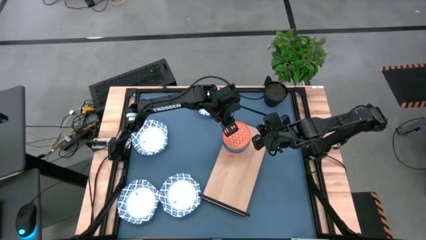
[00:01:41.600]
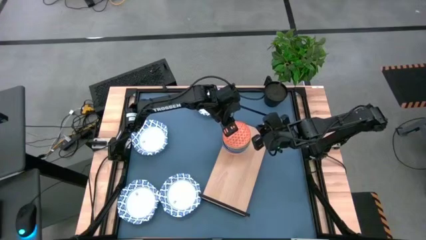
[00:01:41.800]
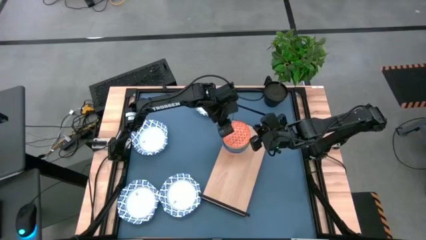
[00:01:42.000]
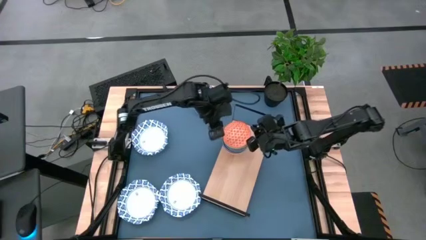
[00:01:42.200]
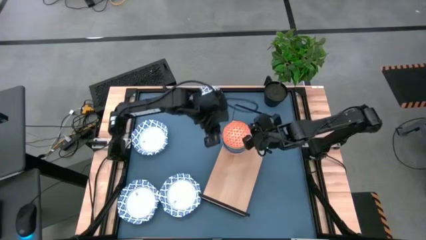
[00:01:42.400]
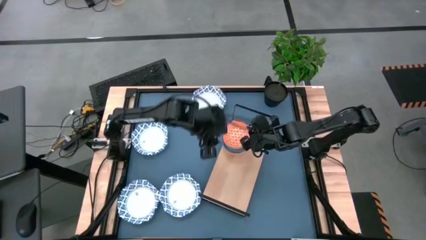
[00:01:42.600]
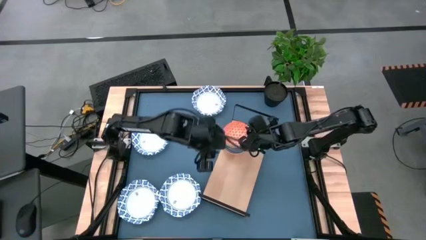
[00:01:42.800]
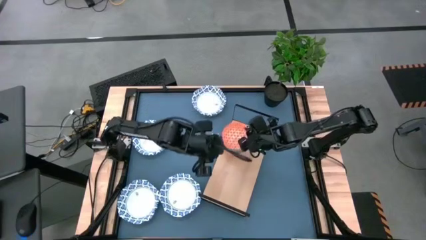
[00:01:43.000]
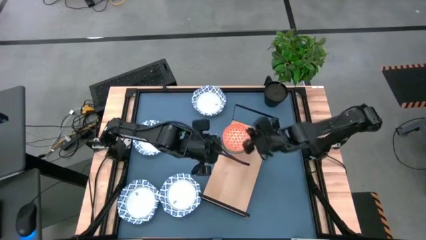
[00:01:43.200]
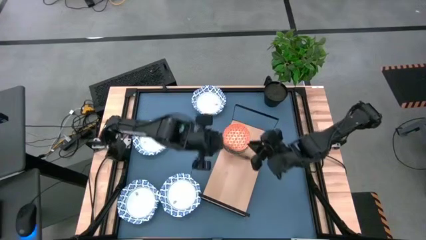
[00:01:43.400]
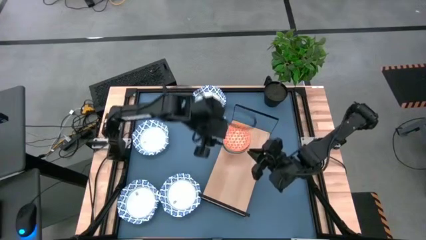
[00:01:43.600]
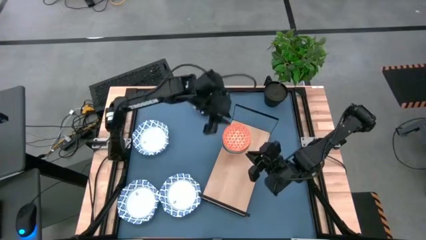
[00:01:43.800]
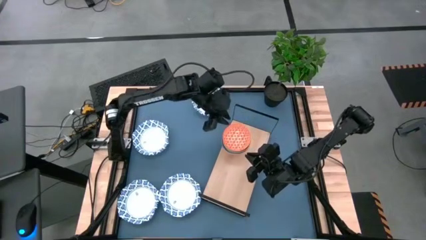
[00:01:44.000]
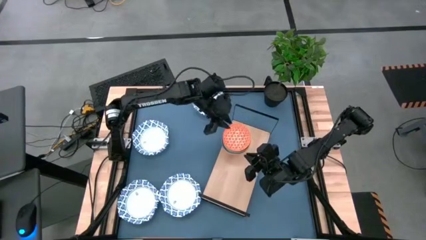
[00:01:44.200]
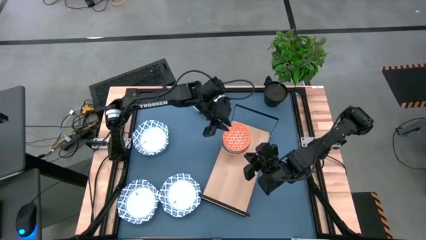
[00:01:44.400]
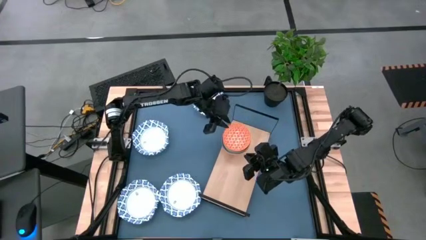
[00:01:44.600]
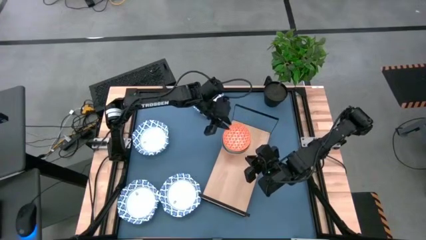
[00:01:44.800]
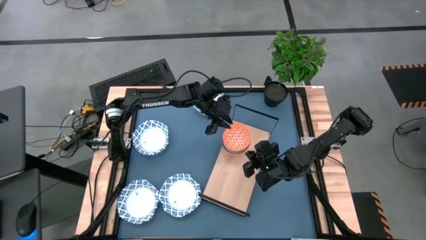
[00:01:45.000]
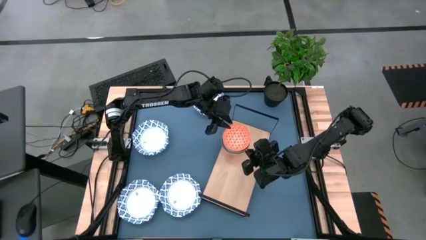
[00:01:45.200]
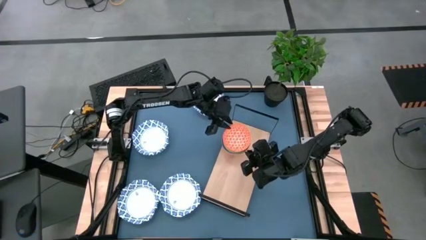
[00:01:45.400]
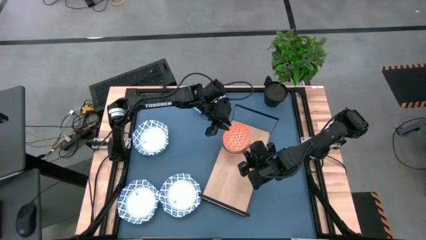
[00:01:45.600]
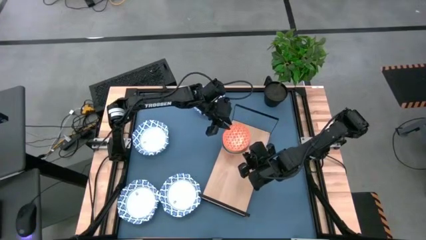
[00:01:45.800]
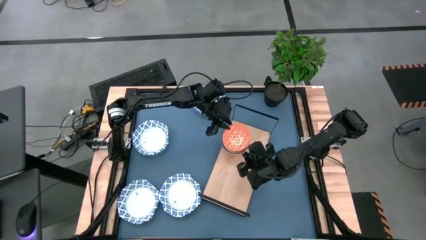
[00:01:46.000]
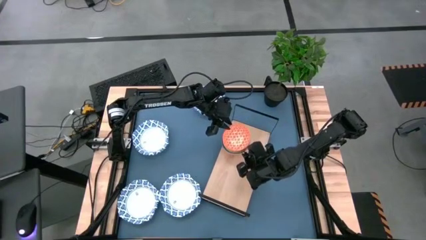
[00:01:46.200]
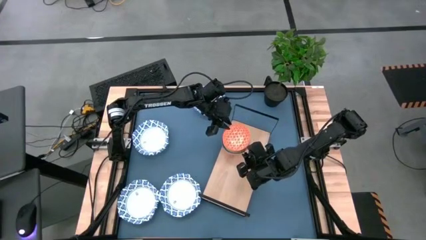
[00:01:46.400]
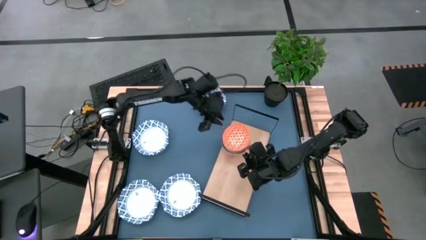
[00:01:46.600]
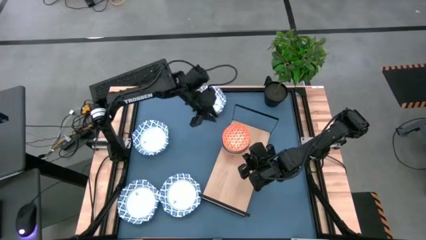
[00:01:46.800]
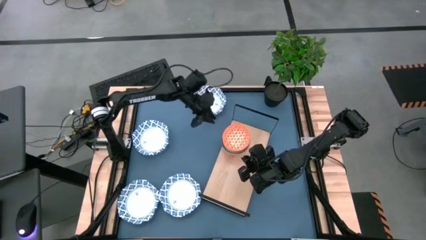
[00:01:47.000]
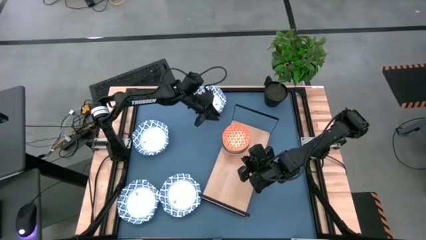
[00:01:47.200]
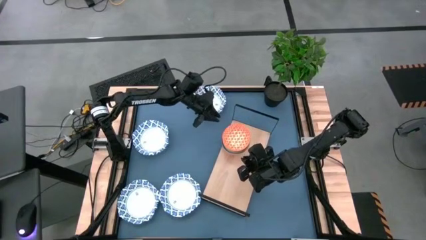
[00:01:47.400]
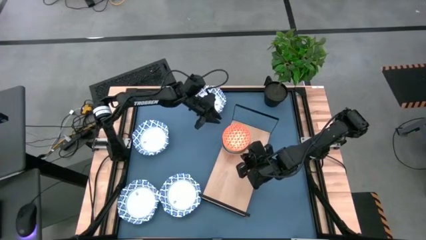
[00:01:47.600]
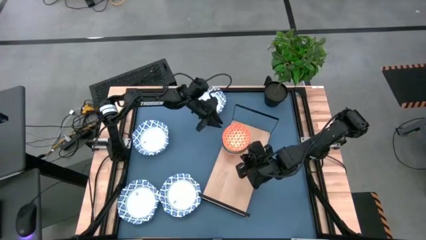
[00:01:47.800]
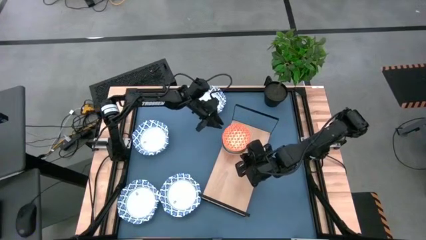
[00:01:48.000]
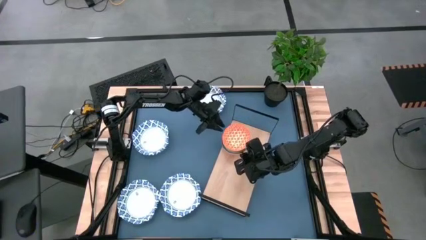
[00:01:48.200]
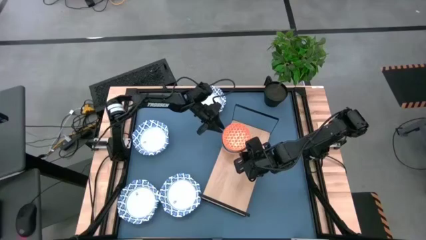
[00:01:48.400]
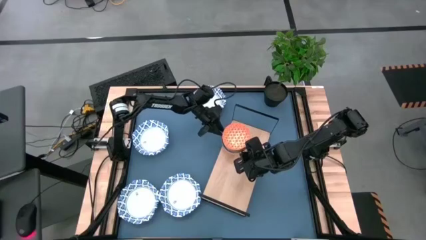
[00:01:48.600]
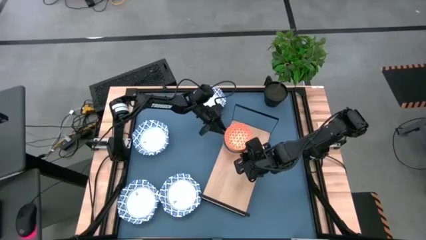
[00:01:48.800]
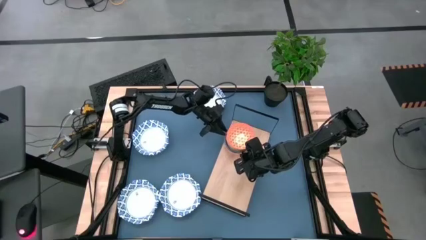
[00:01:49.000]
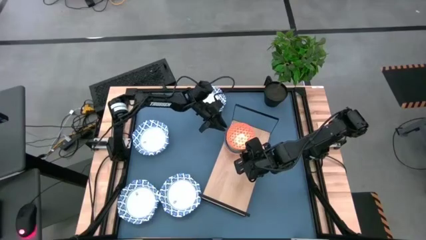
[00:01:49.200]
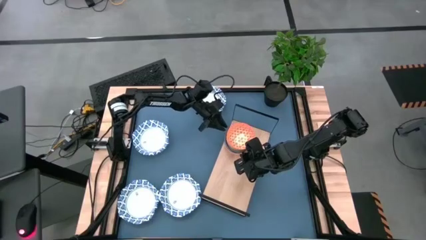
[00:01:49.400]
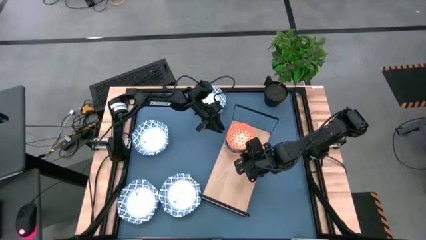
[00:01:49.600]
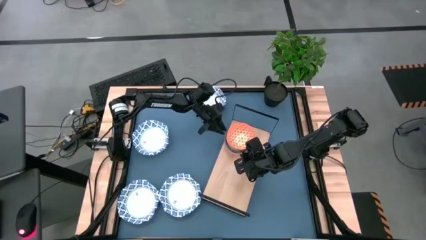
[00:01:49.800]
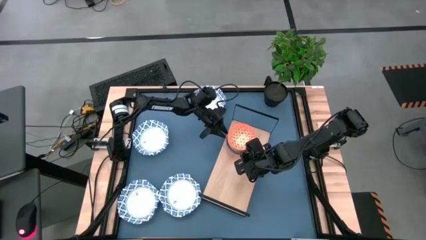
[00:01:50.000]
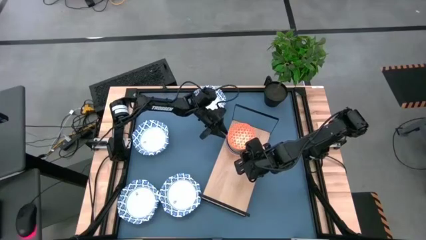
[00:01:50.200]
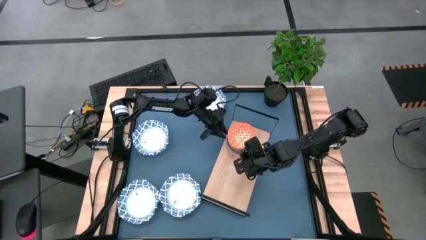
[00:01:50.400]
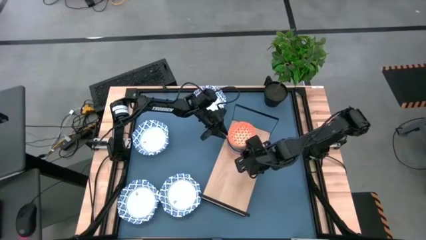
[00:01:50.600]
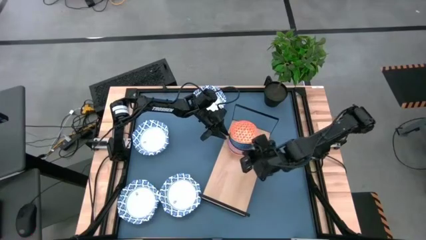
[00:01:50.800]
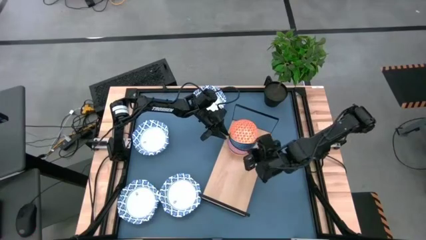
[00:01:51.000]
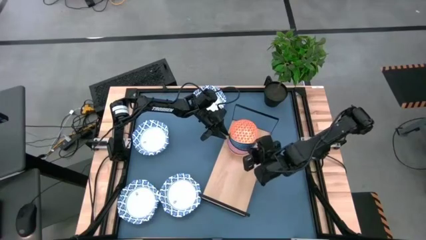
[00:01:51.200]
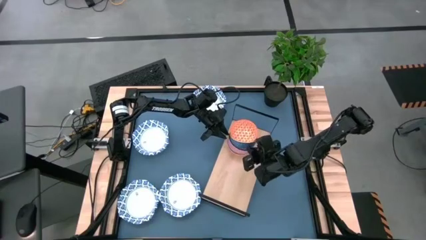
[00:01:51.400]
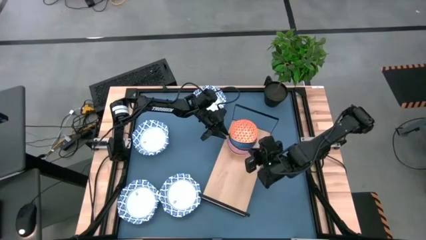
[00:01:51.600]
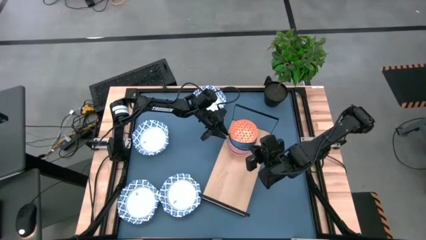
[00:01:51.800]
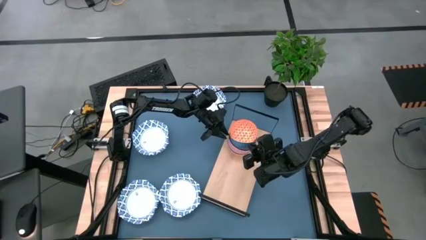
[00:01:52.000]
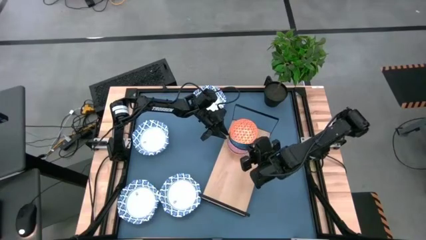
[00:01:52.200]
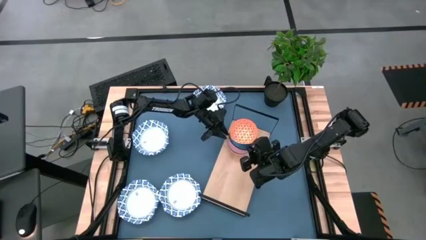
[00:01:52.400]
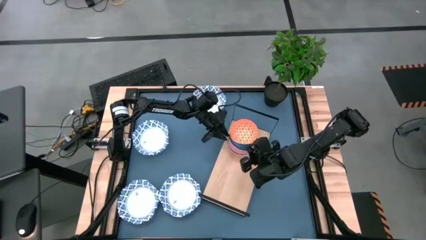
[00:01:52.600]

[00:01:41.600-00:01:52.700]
Task: Place and stack bowls onto a shelf
Adjust the stacked bowls on the shelf

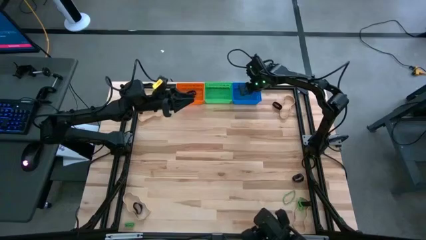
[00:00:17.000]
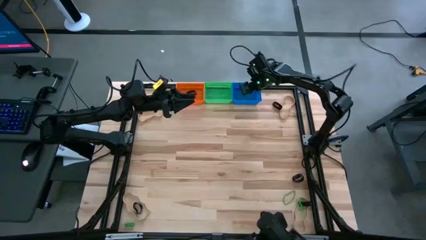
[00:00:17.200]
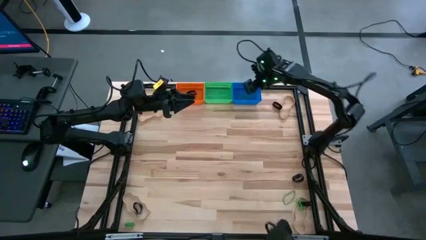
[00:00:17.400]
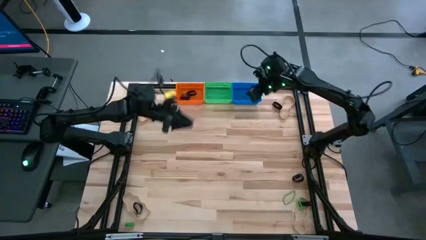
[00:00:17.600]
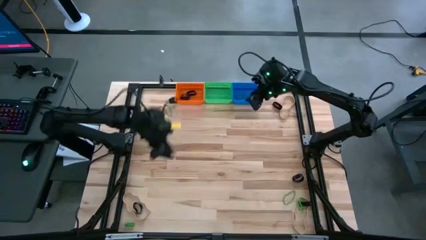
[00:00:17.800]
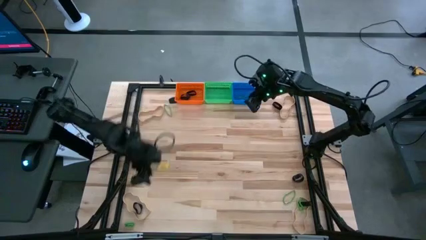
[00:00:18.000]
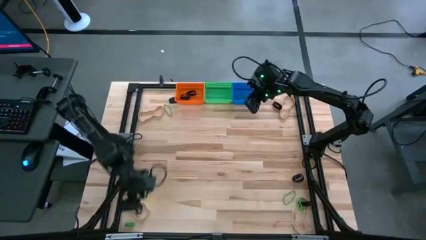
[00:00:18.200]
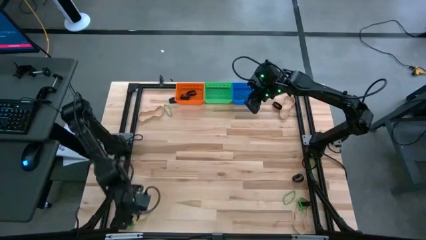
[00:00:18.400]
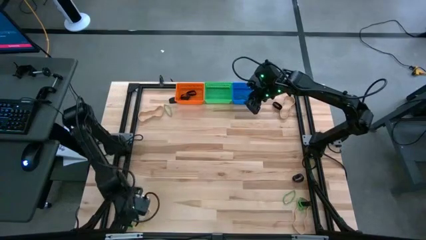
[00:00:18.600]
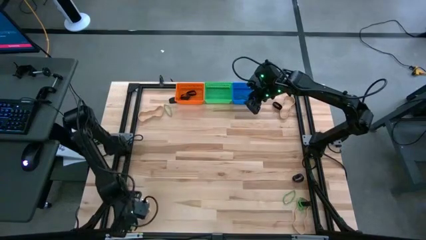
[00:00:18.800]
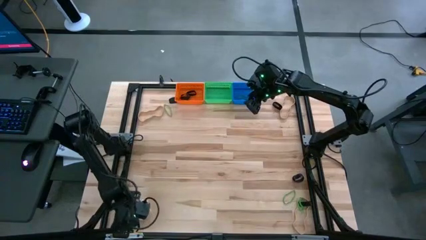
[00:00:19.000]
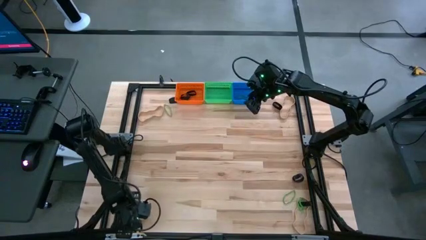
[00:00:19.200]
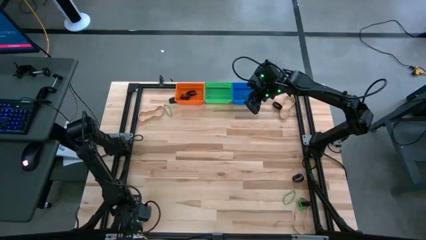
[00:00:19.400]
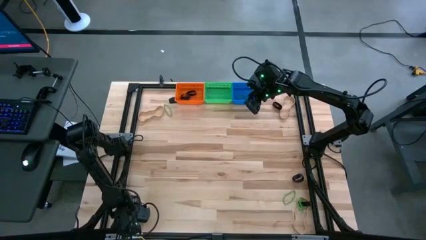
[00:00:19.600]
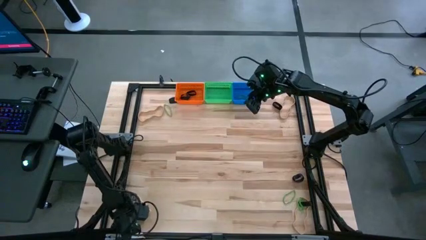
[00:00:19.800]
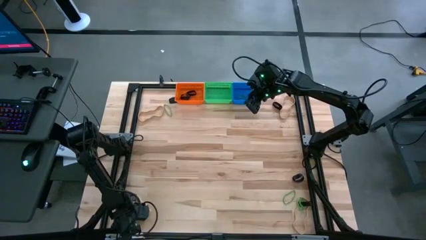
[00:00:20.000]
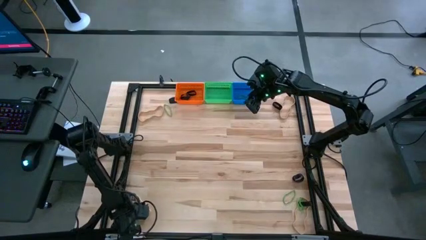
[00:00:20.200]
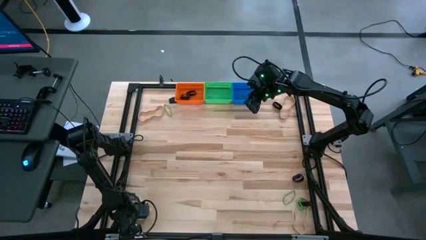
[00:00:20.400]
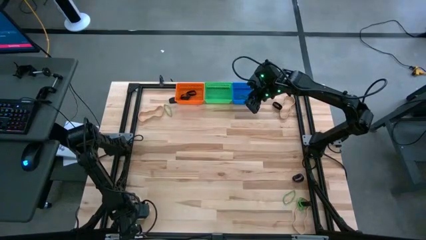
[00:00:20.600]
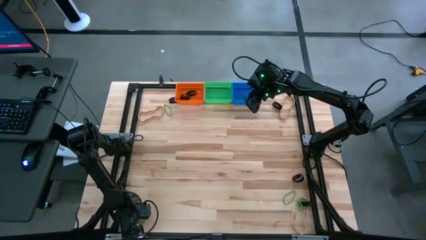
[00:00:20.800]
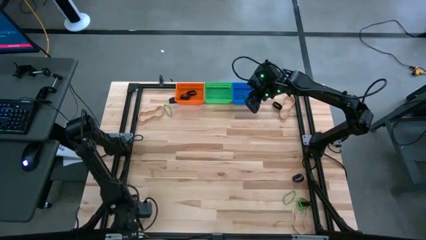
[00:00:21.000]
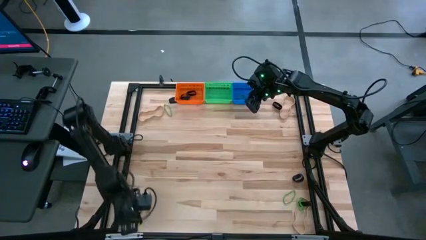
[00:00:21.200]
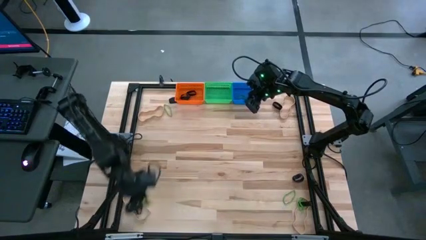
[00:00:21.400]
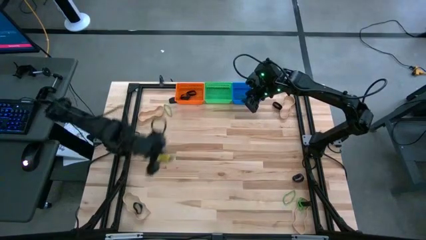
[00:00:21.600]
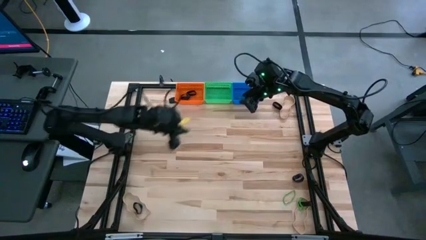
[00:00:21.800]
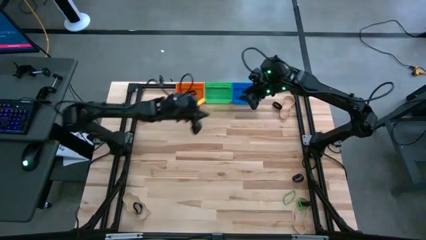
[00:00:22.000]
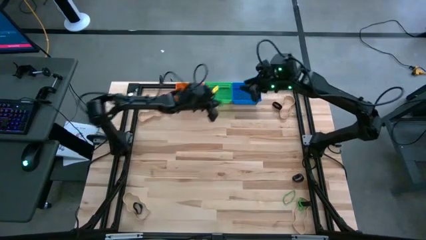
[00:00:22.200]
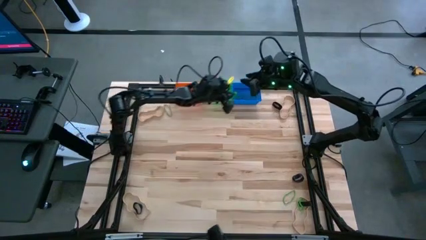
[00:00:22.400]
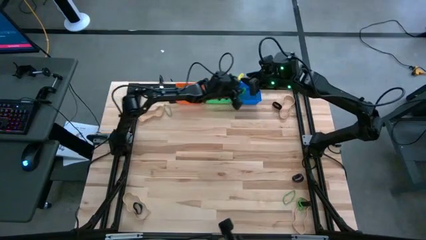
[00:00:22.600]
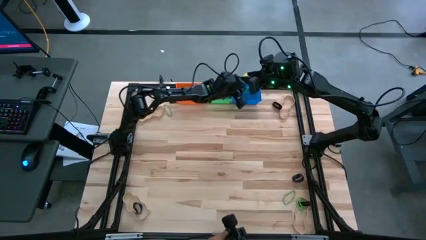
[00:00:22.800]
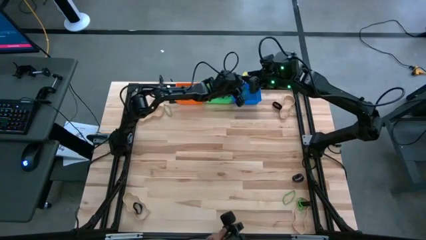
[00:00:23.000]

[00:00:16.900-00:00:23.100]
Task: Sort rubber bands into baskets
Put the green rubber band into the blue basket
